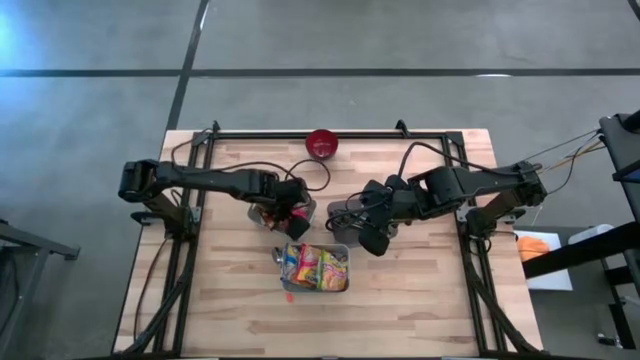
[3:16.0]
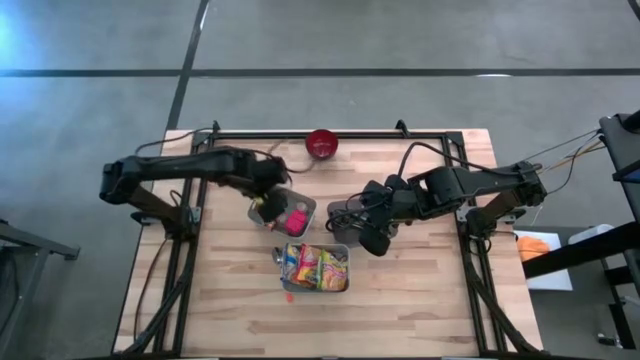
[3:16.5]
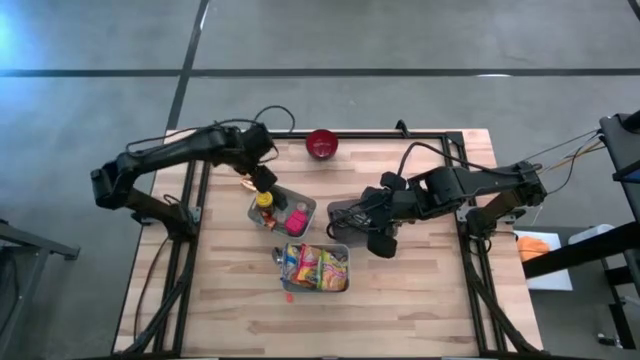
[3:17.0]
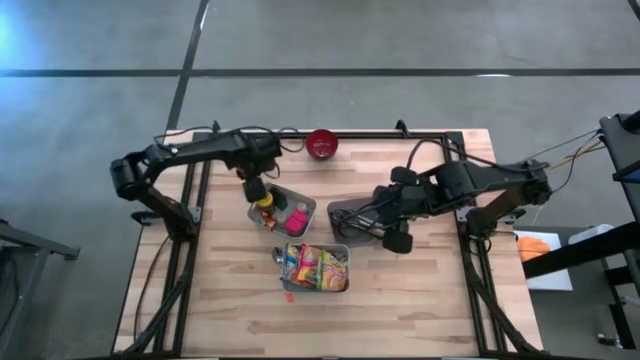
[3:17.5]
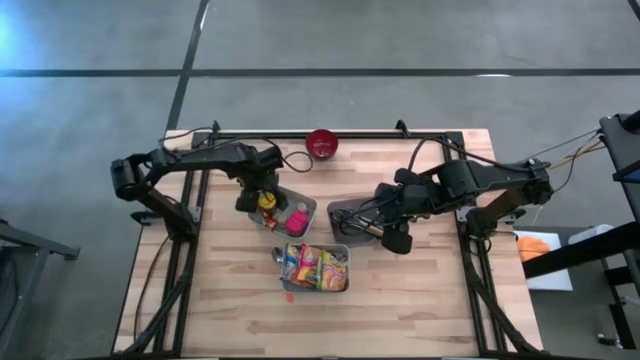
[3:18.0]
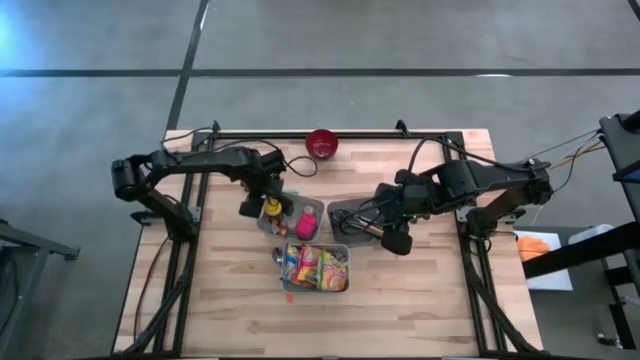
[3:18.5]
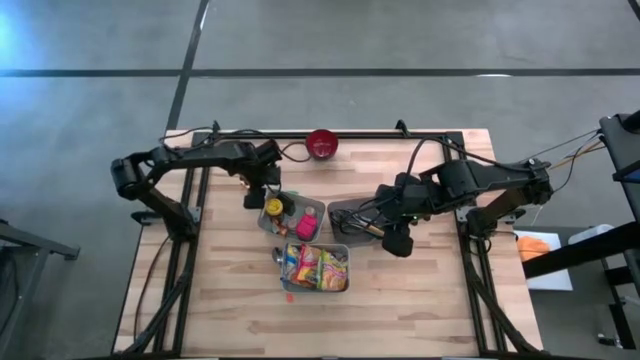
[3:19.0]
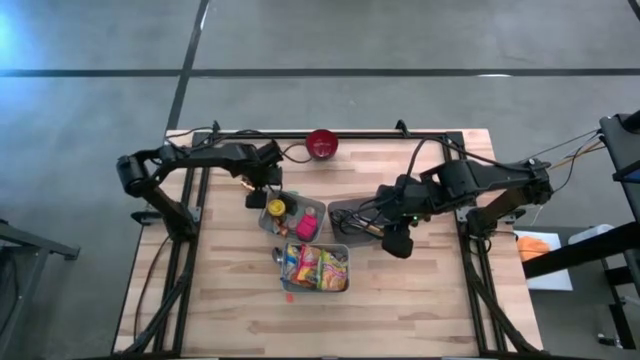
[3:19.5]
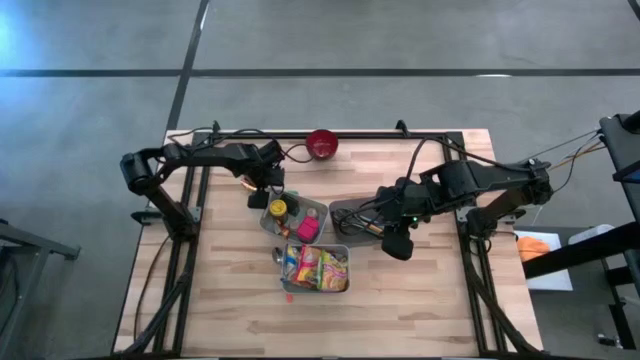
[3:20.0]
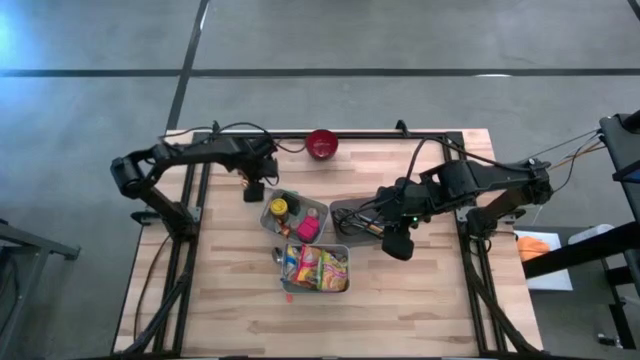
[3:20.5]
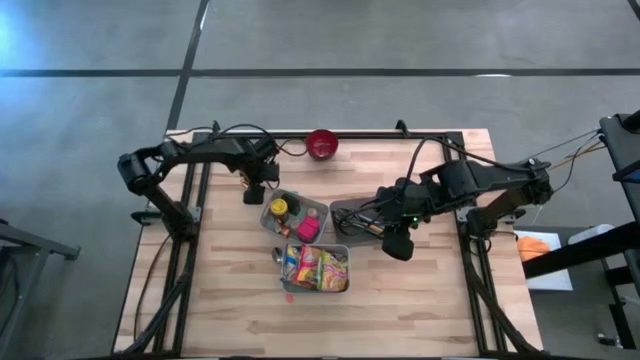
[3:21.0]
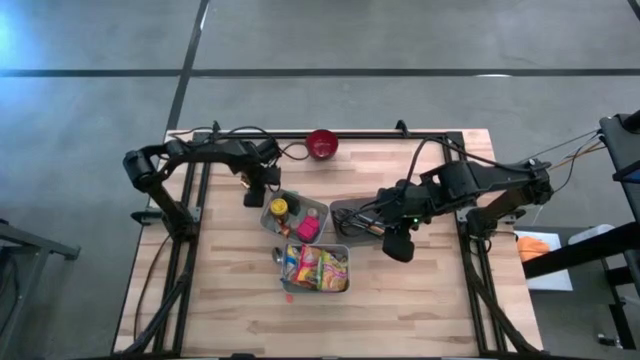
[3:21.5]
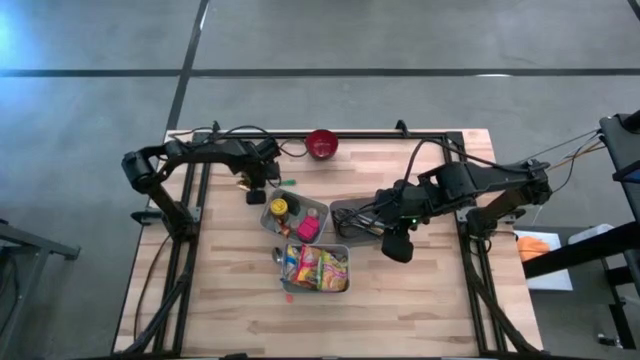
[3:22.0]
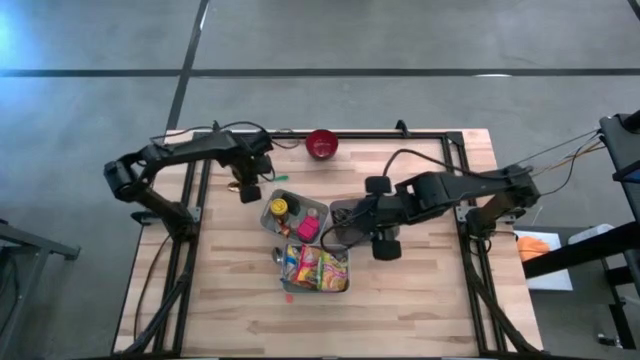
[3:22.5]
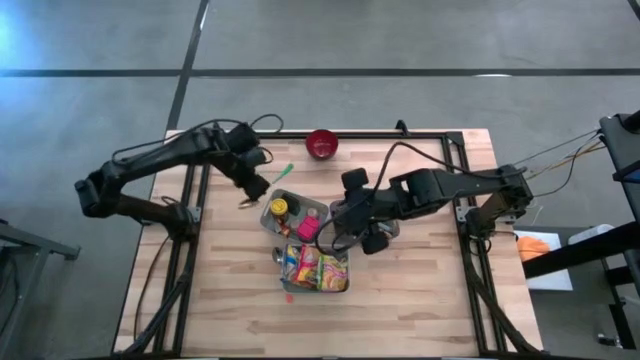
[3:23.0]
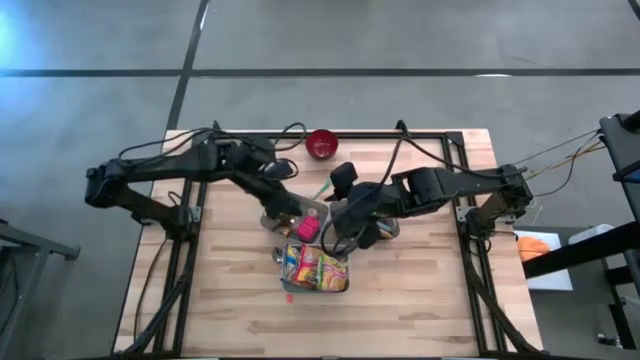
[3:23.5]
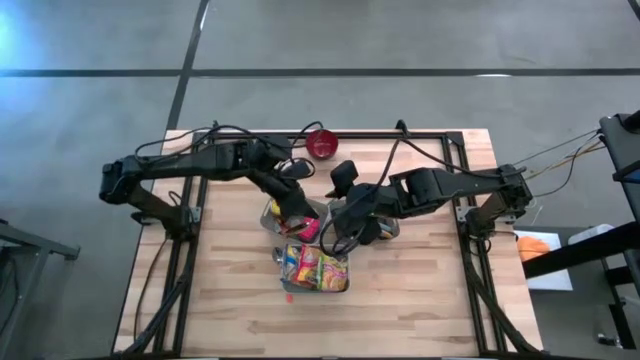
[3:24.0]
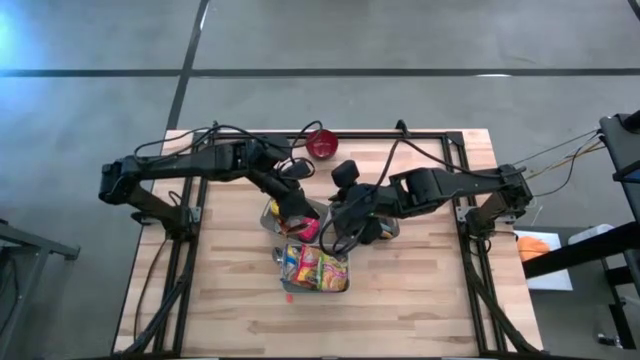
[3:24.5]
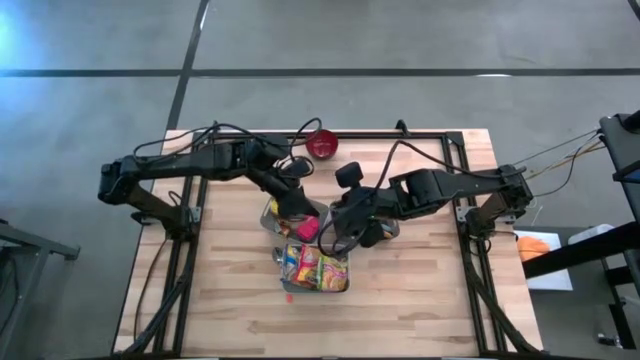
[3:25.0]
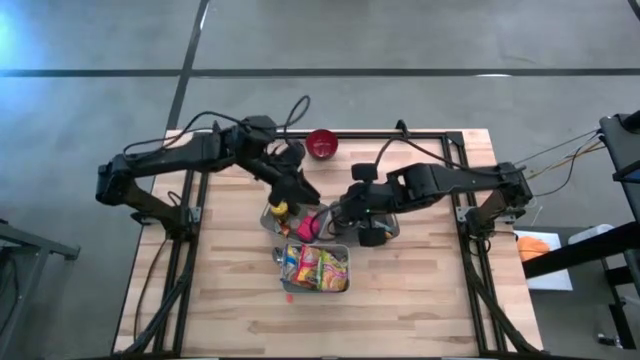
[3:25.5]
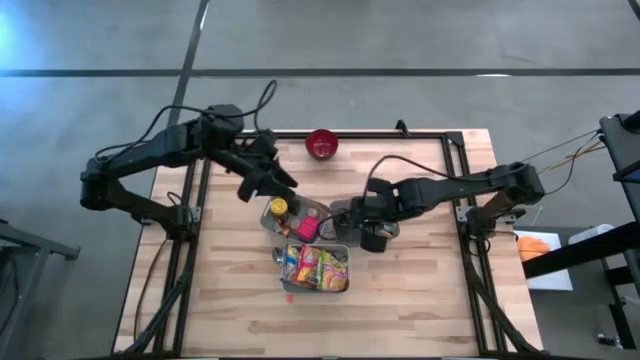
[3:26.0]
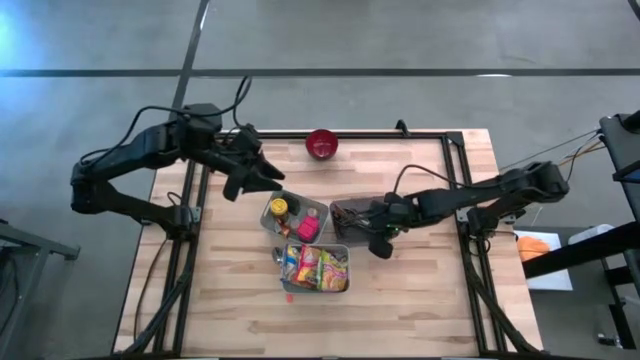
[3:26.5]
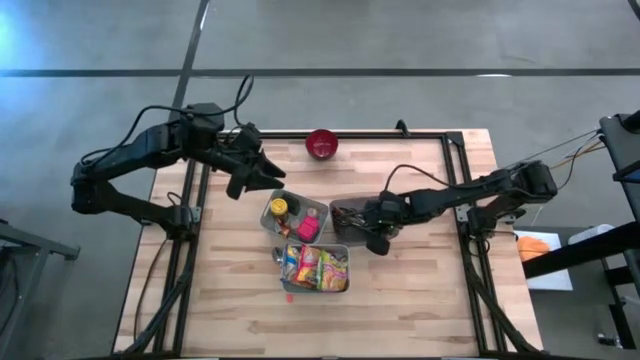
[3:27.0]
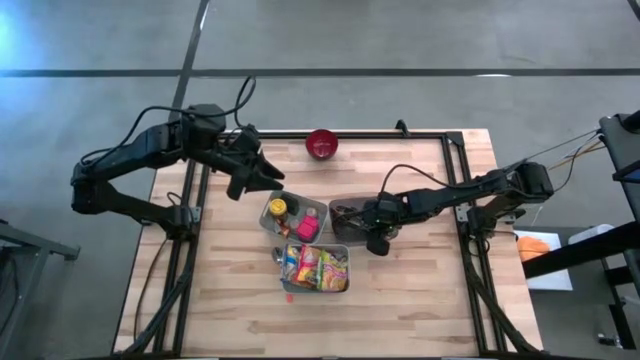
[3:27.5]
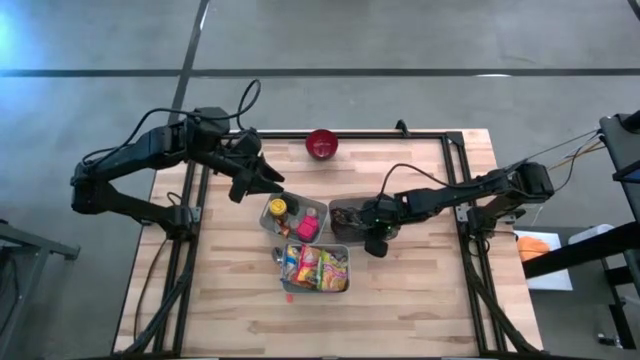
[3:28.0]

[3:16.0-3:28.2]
Put the green spoon into the black bin
